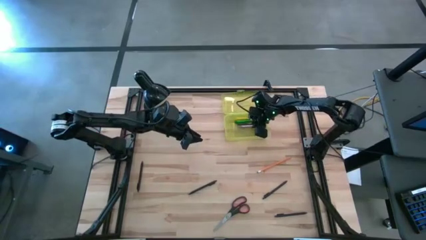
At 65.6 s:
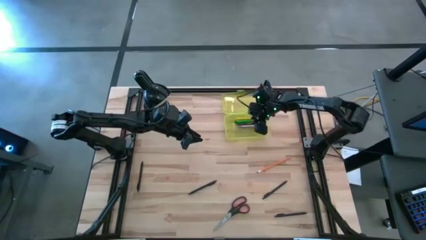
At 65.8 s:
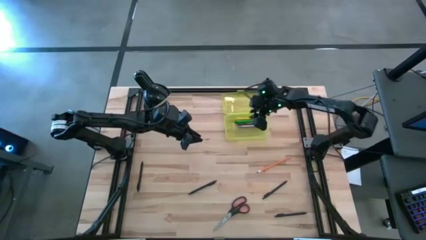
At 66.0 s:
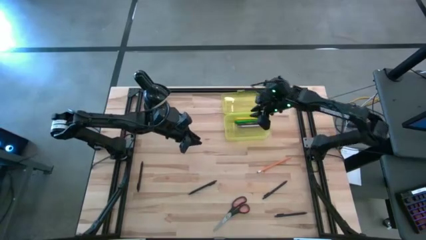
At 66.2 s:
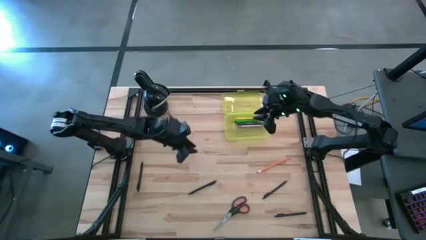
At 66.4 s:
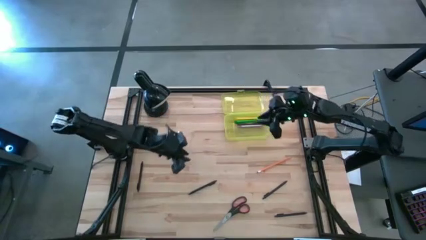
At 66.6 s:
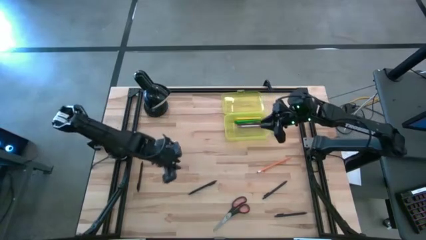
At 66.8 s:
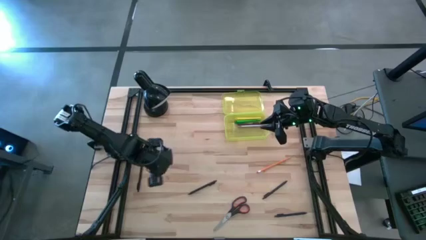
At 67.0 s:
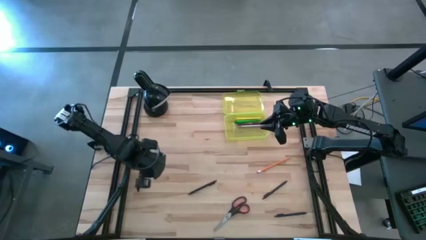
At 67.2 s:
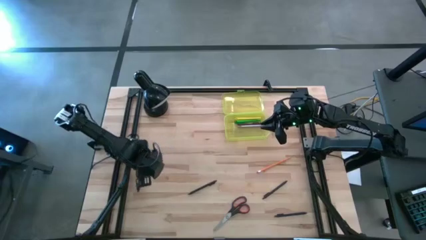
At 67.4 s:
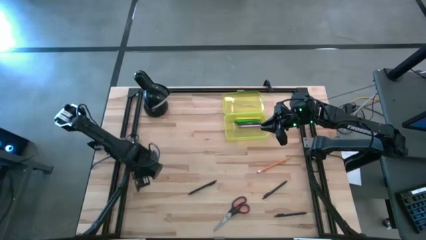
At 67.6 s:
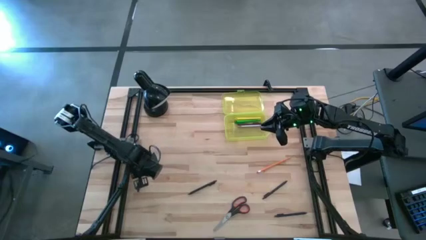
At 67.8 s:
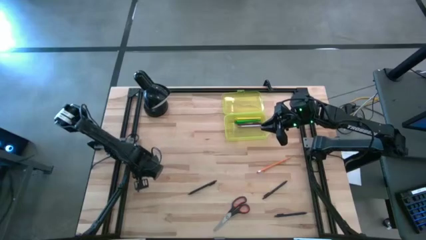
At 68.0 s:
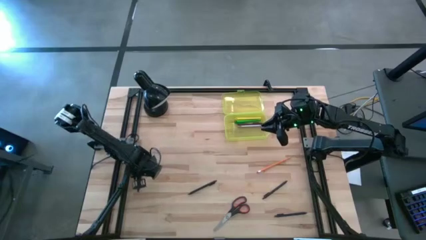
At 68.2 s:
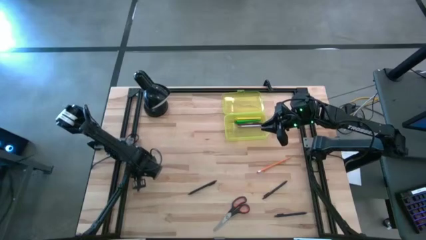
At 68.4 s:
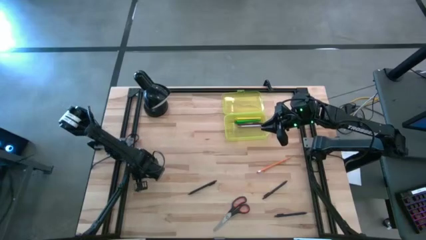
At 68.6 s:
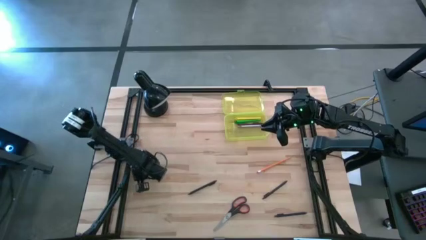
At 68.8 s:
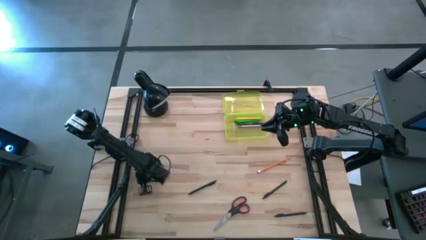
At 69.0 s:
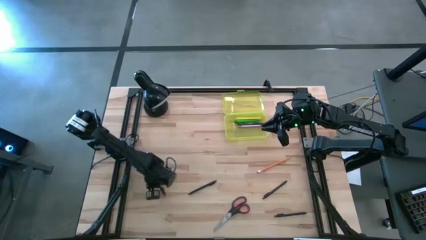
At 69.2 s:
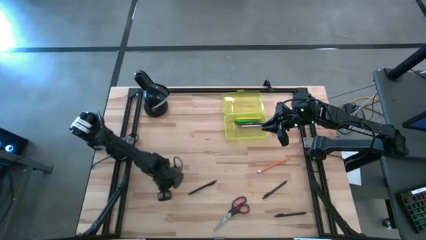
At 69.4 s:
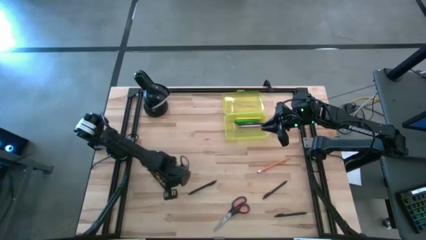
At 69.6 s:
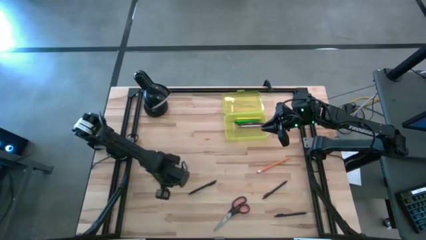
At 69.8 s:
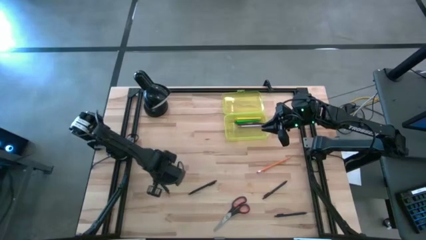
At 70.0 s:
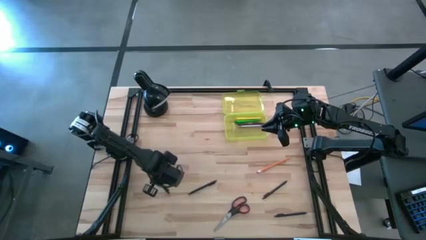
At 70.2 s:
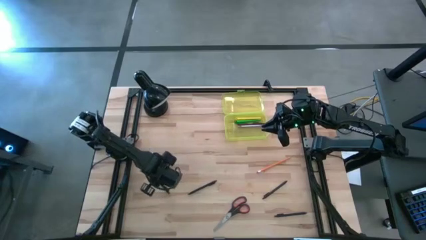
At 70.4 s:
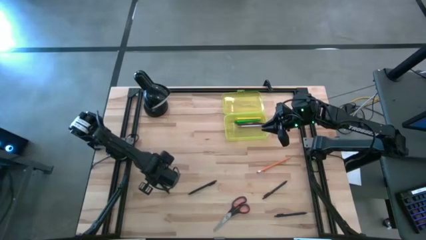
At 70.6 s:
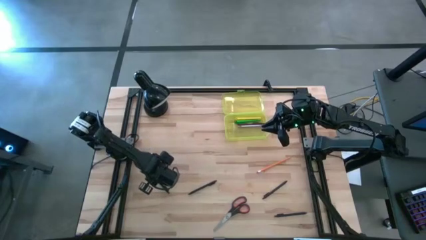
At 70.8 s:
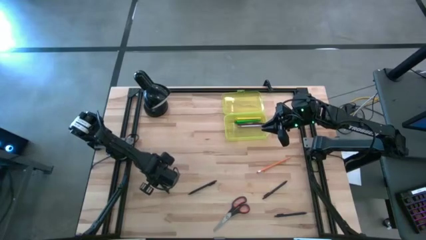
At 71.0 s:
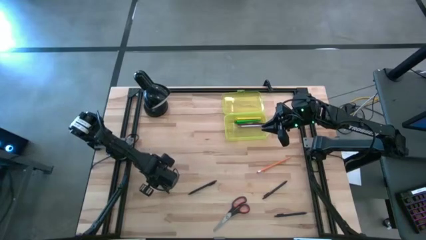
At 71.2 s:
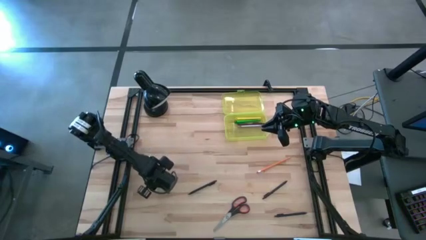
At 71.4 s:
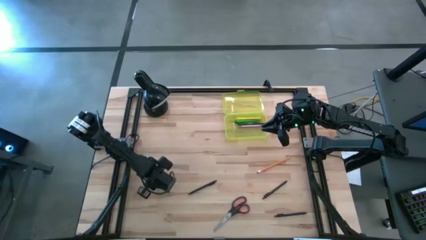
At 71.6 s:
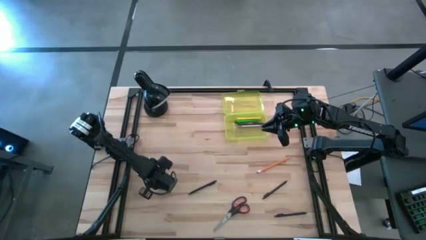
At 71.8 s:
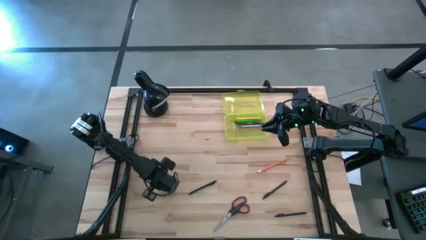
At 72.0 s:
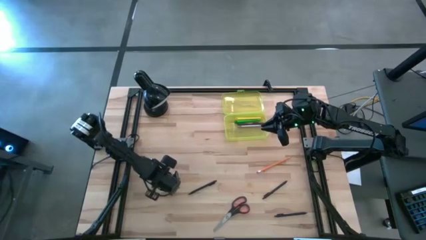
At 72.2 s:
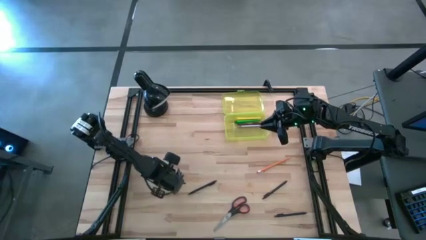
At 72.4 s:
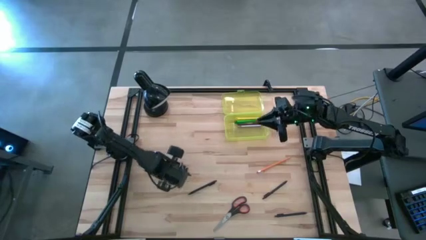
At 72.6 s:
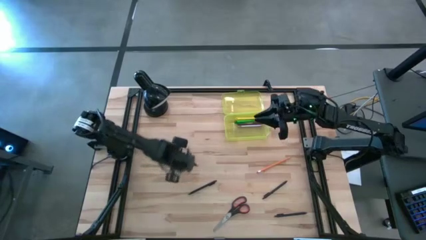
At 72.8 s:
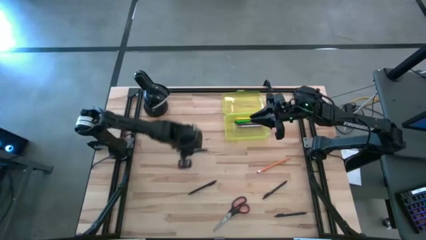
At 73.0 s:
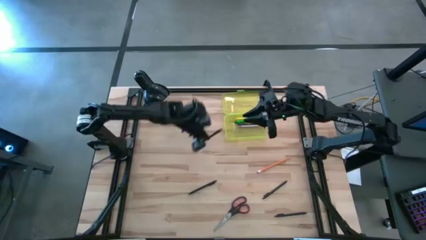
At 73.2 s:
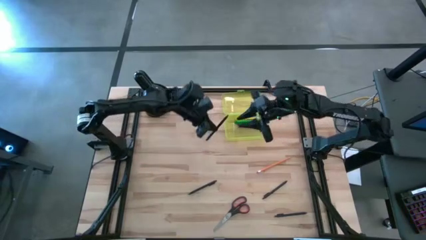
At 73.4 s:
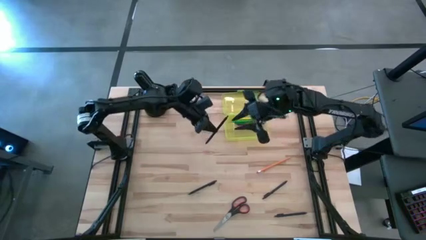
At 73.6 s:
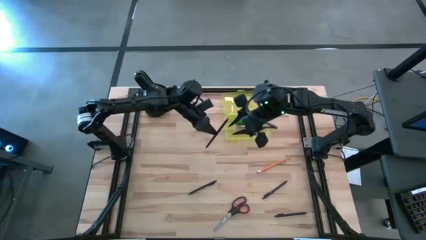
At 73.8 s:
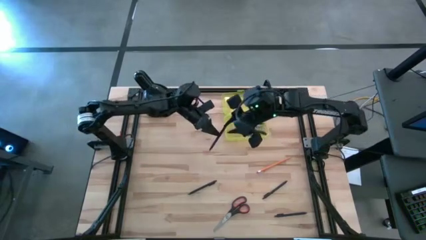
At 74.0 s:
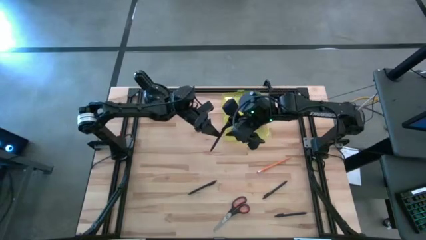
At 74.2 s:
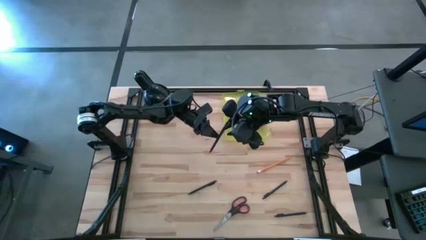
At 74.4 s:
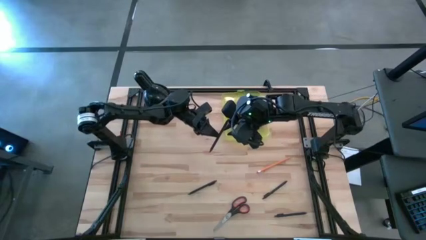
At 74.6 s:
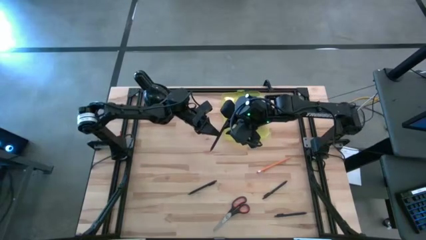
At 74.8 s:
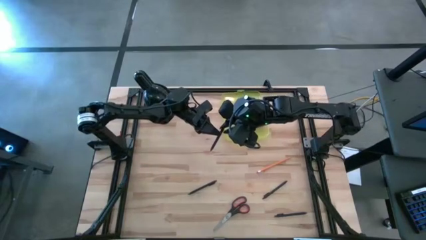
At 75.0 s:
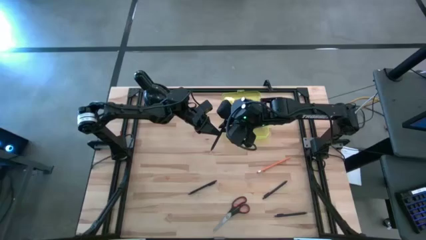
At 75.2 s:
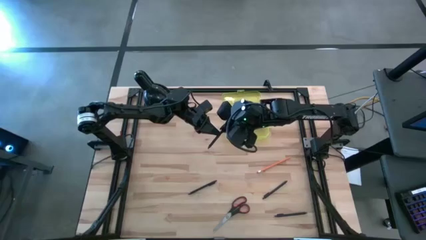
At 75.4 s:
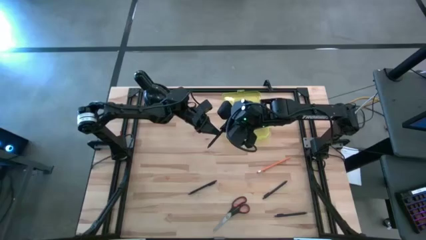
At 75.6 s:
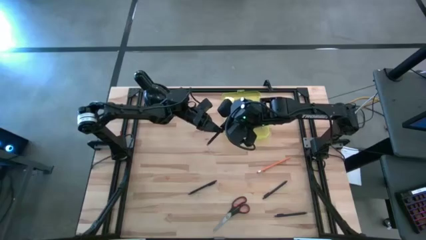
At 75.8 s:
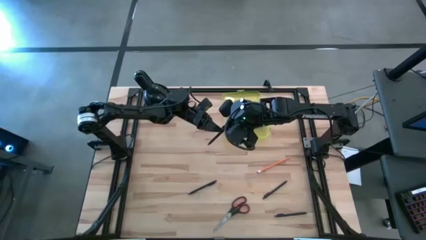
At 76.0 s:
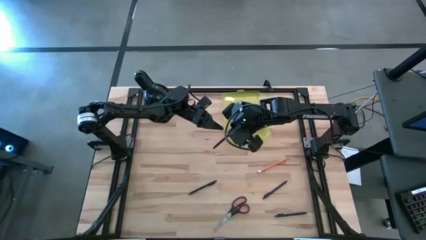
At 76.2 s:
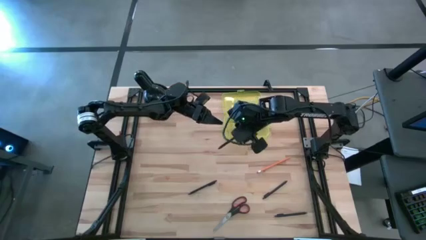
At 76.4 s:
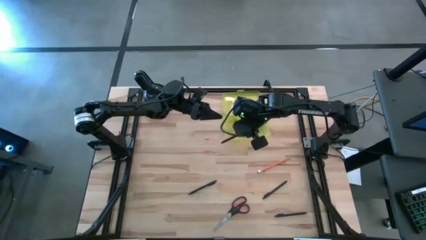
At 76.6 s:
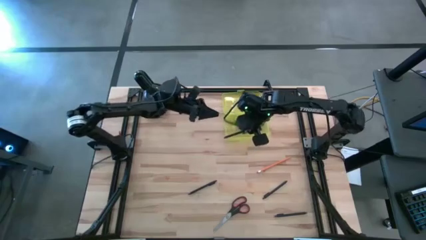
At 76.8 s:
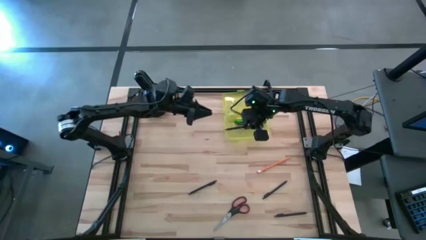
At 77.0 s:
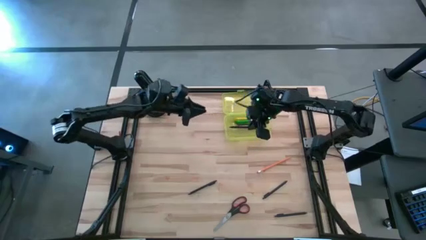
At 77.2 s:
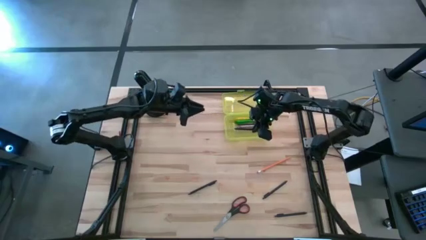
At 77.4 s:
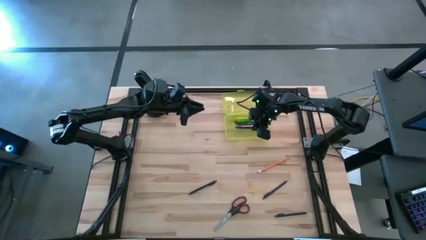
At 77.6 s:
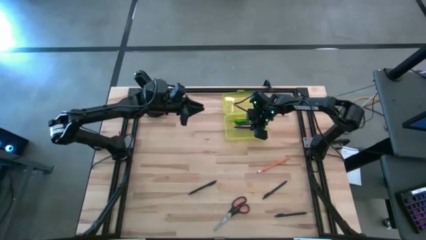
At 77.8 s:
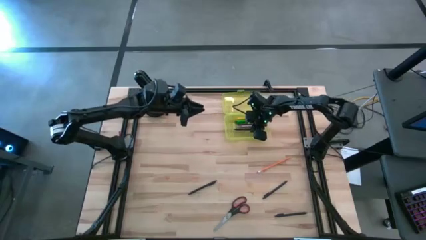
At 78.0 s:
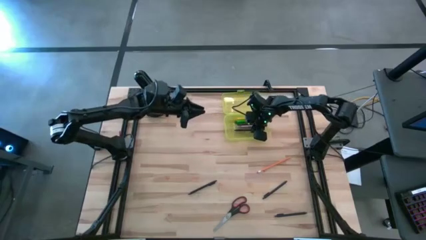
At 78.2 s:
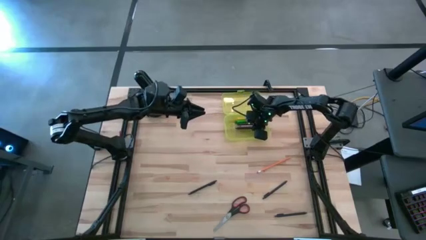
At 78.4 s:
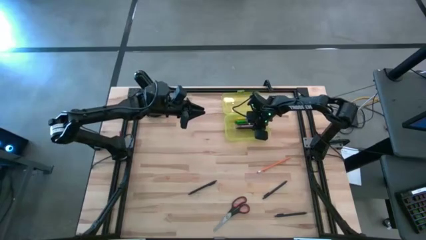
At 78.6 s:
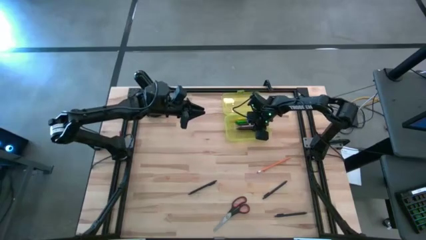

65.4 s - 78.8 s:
Task: Pick & place school supplies into a supply box
Put the black pen into the supply box
